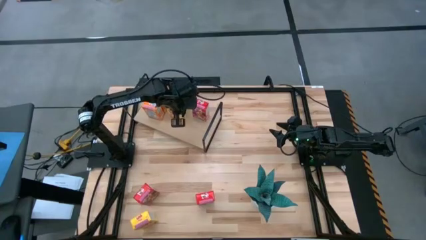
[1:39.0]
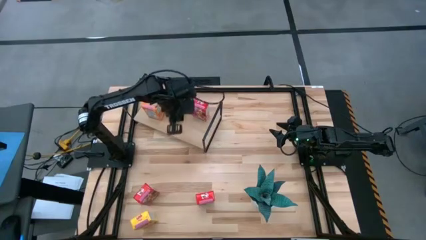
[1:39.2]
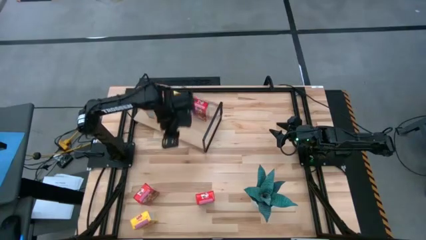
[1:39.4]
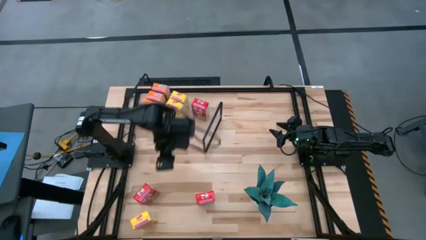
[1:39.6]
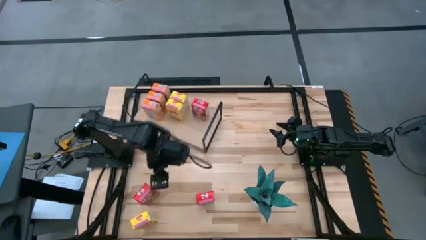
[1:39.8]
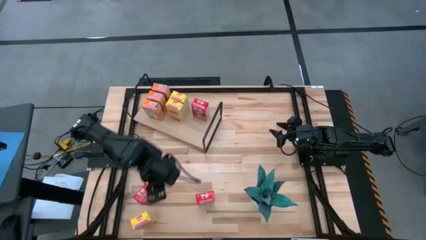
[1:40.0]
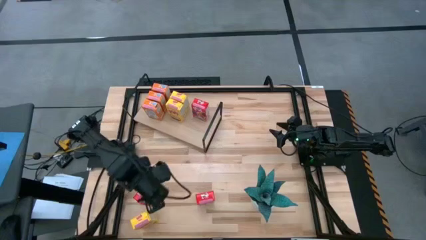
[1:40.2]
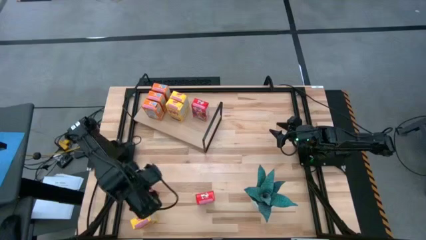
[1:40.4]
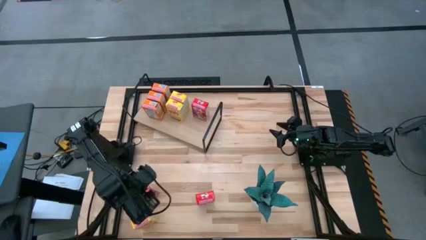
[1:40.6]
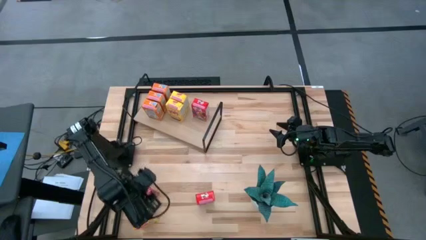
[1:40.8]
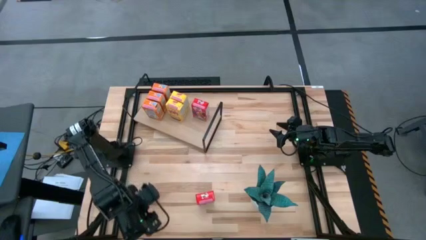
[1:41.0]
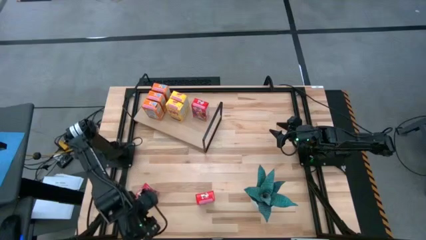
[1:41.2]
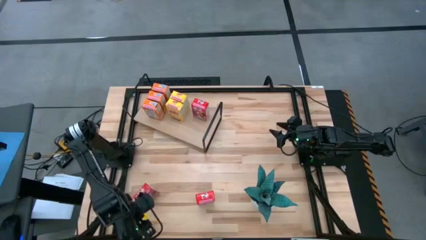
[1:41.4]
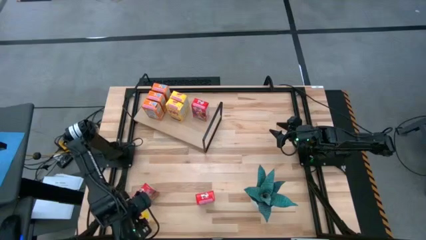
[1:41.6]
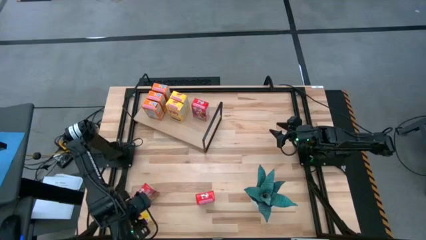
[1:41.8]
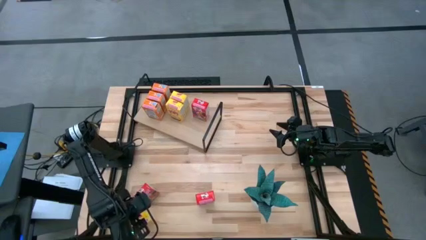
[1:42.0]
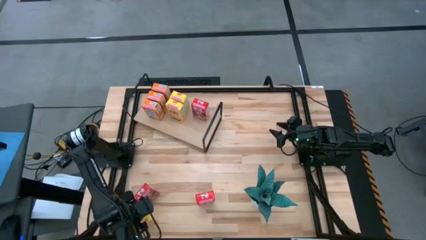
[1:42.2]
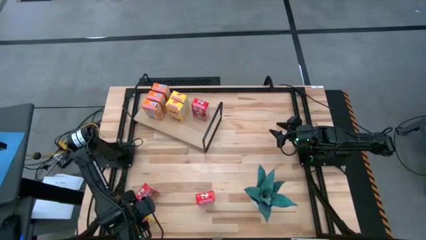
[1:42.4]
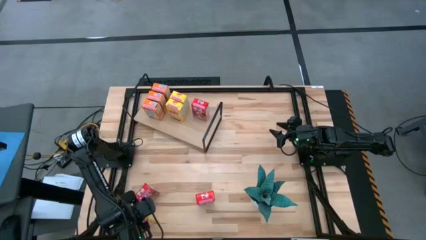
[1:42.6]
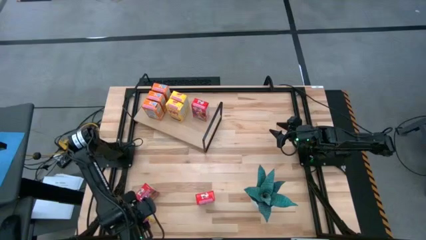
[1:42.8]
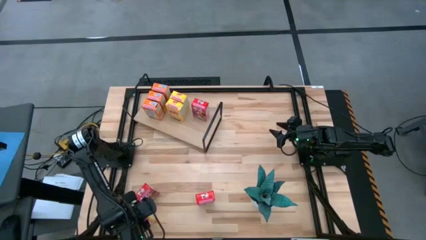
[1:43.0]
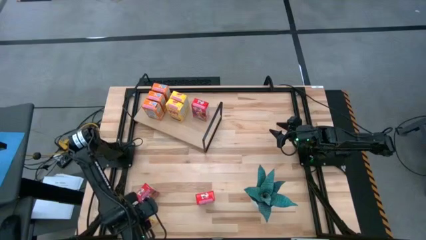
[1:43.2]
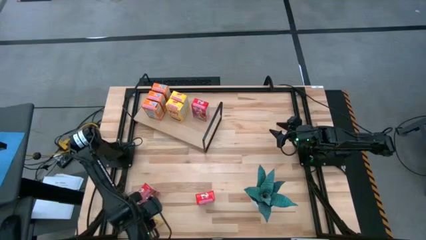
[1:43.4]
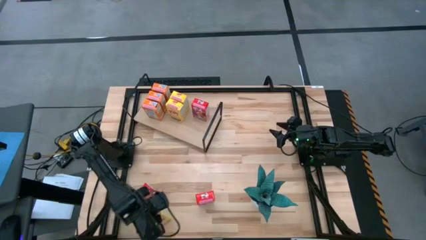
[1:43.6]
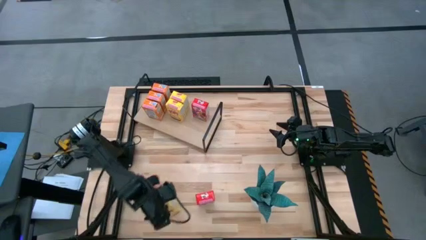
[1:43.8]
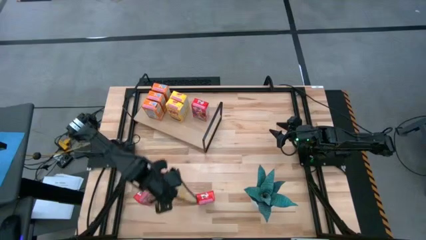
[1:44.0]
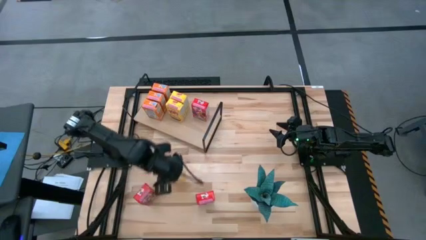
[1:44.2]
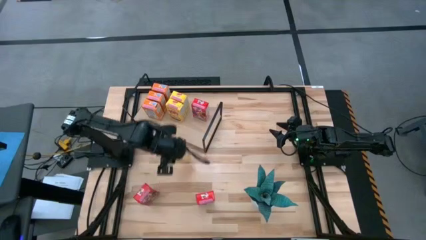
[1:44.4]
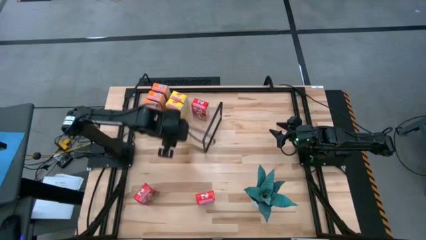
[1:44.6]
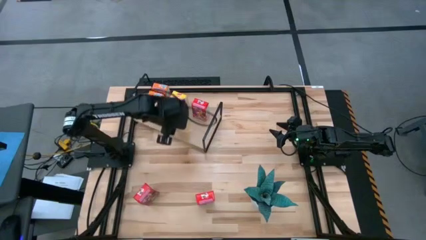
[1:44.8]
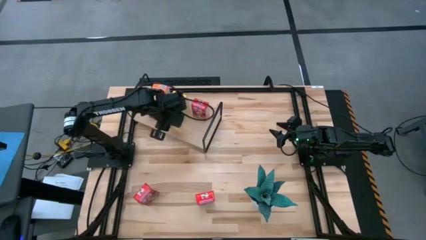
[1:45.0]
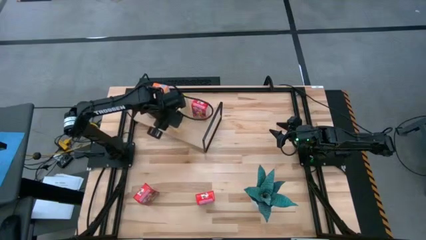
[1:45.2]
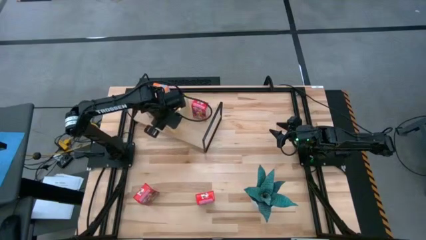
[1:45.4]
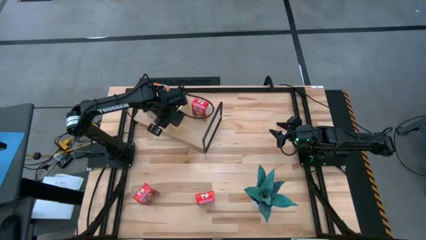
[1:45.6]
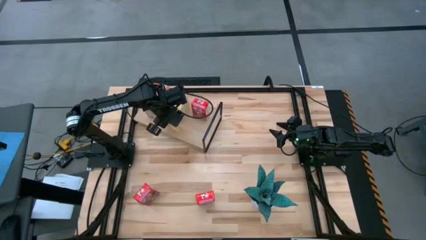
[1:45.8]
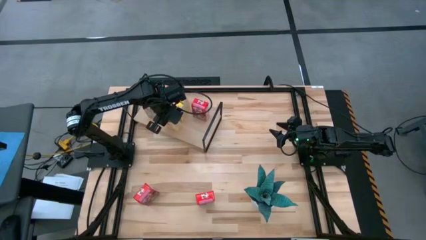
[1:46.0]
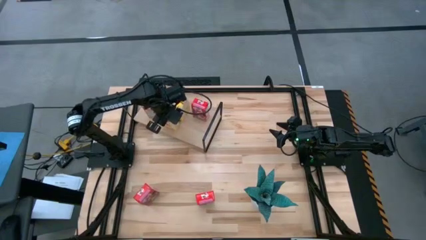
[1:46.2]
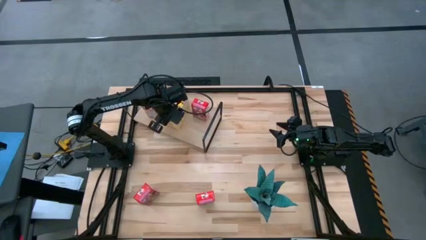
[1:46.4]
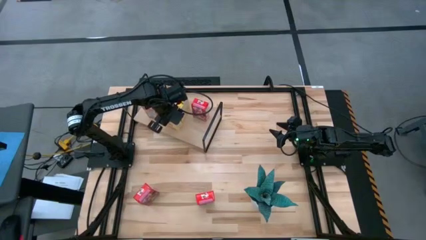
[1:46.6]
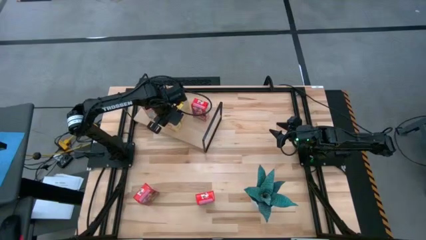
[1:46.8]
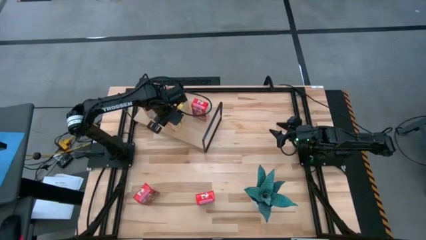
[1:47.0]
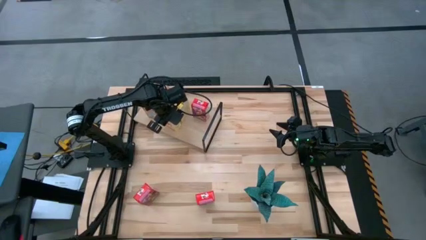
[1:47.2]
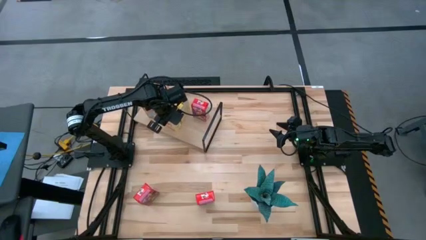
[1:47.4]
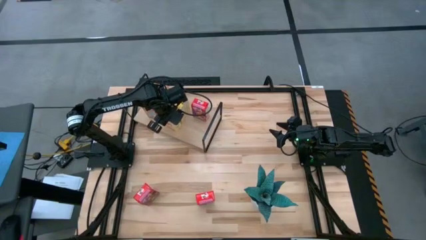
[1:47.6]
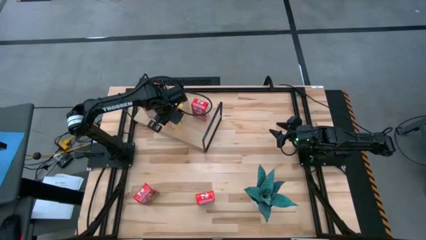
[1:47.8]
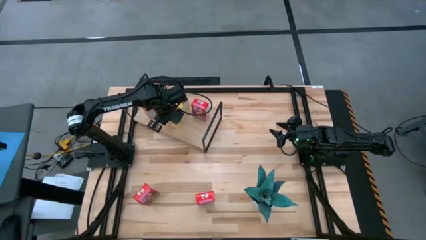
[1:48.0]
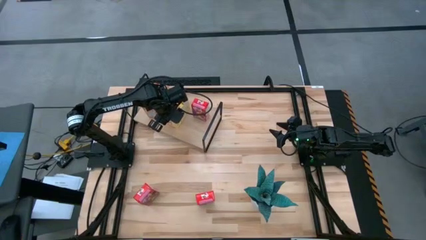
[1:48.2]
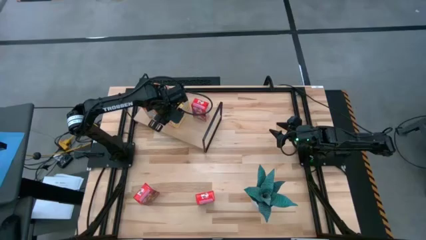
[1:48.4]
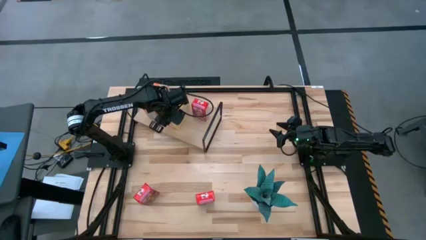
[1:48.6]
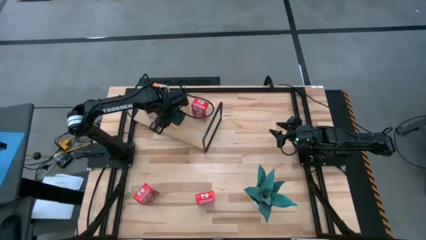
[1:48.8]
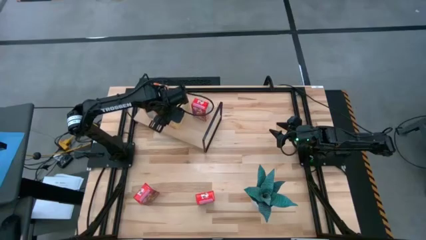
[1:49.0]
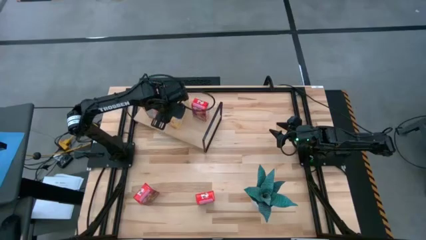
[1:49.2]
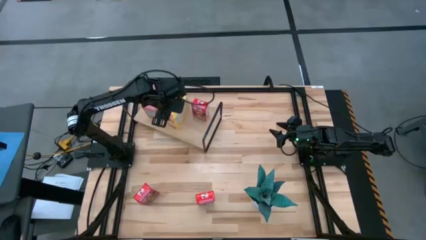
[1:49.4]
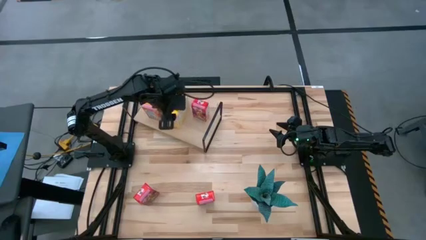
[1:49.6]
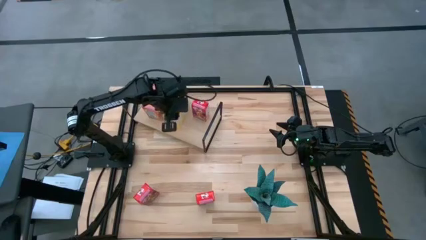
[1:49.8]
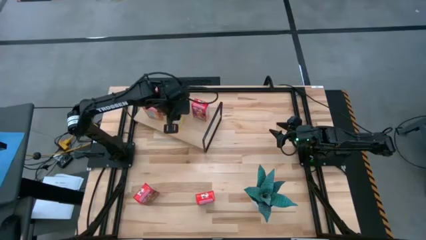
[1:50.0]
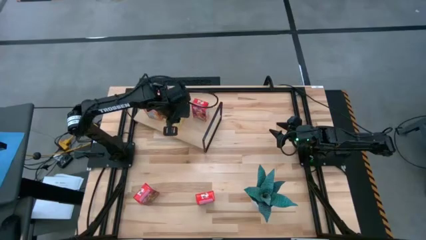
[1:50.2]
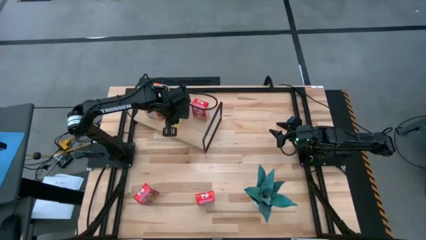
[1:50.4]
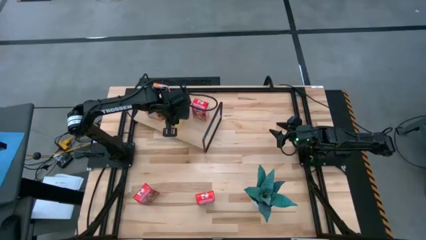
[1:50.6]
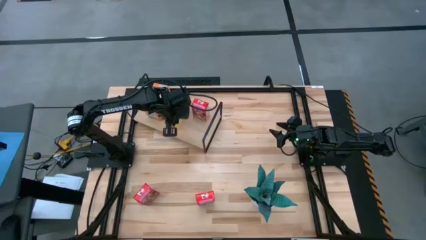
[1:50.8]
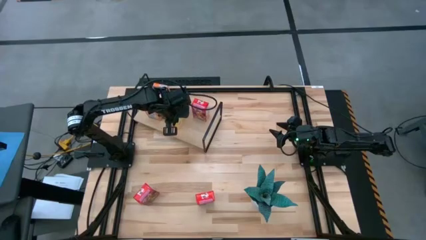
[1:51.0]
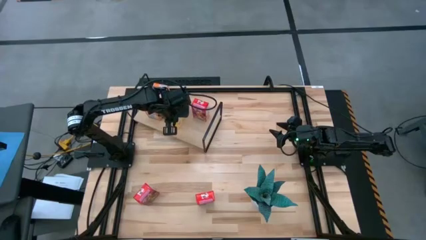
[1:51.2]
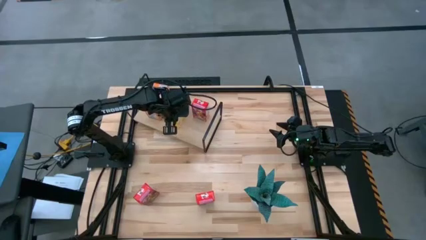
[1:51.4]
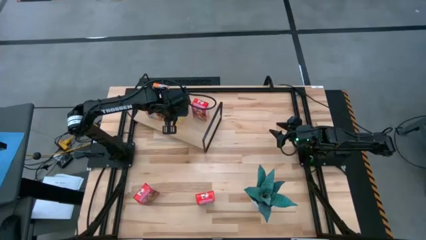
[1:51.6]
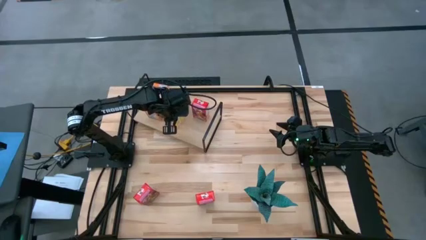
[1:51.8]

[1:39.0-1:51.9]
Task: Stack cereal on shelf
Put the yellow cereal box aligned with the other yellow cereal boxes on the shelf

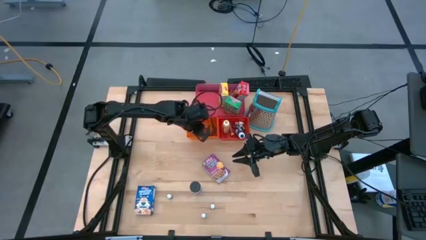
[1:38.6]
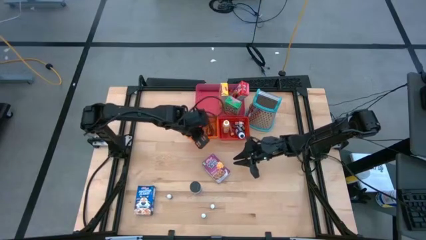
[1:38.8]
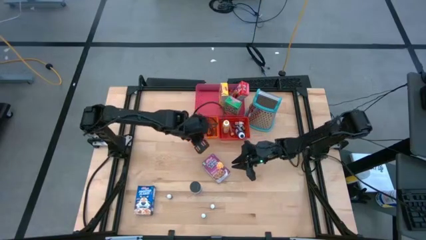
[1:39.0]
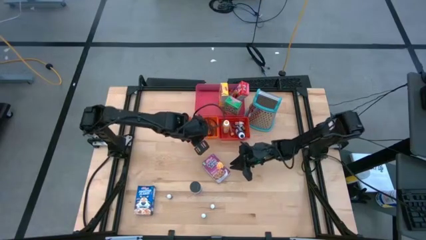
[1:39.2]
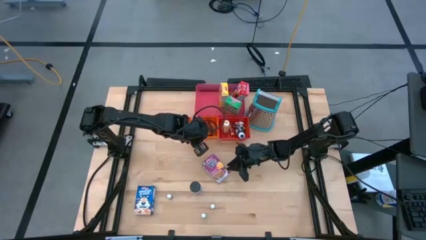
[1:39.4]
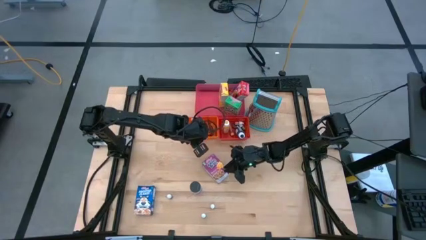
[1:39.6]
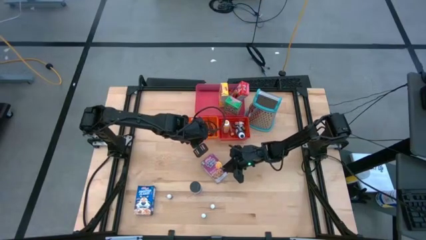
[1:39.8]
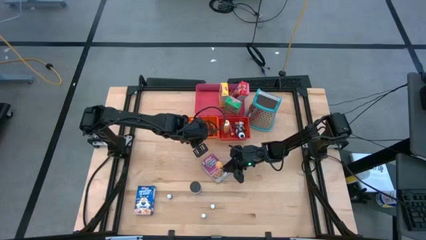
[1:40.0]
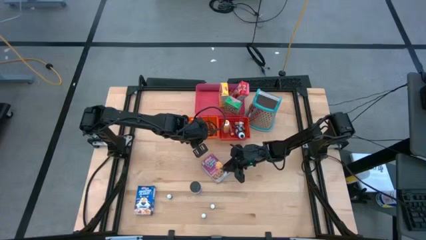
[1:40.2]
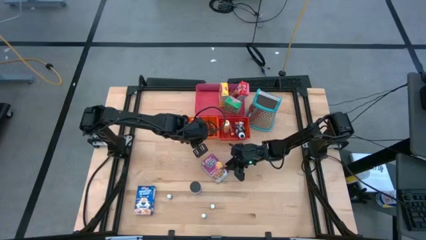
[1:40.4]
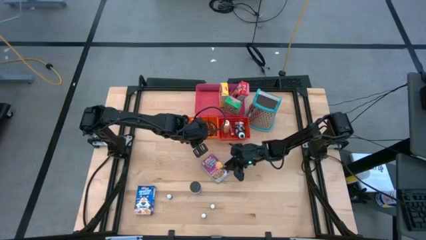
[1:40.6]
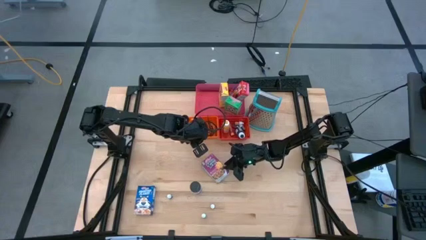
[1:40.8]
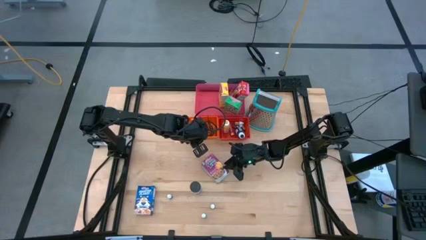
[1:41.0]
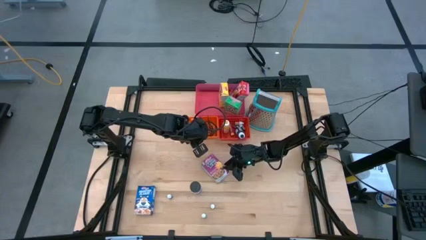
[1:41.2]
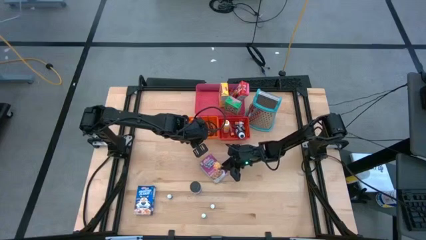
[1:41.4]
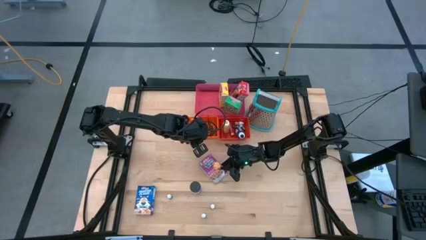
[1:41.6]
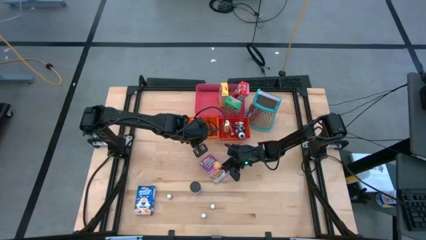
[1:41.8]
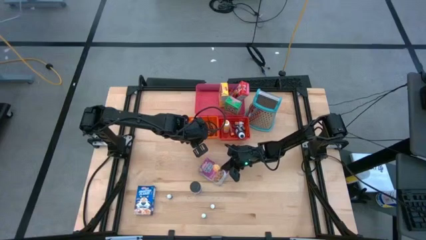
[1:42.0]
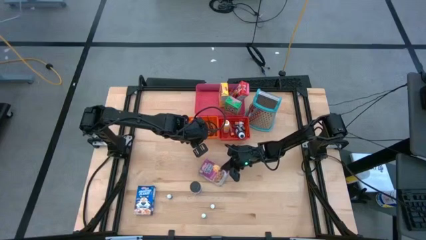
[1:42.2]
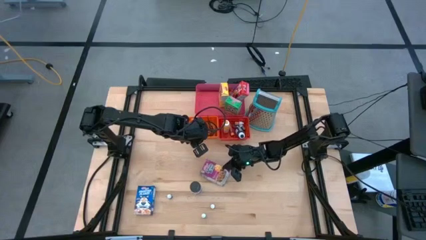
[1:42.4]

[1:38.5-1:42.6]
Task: Pick & Place Kitchen Items
Put the violet cereal box into the pink bin
